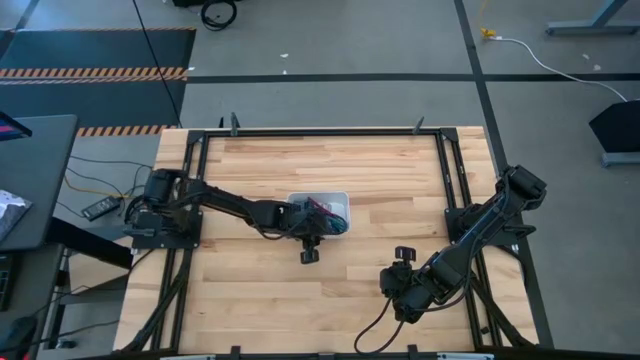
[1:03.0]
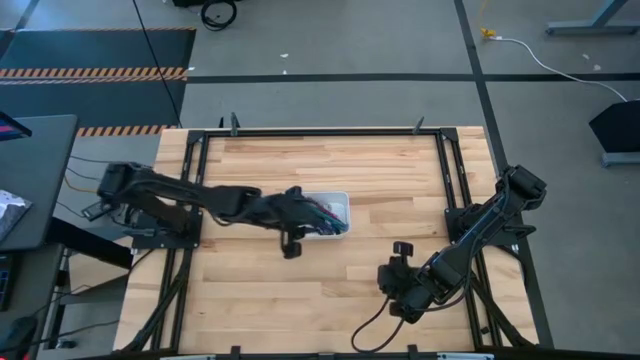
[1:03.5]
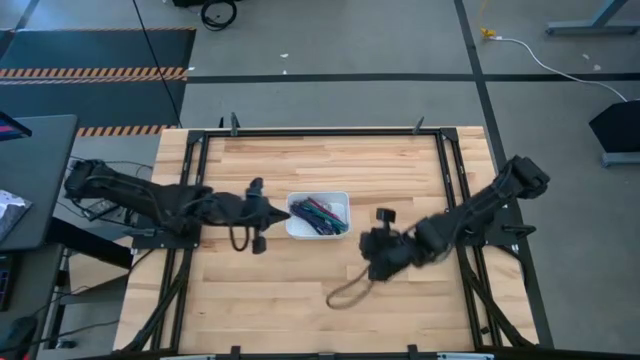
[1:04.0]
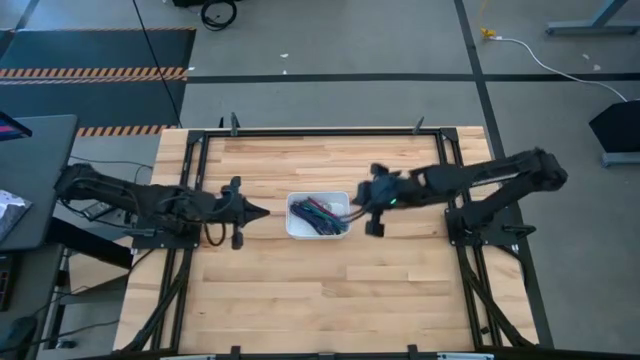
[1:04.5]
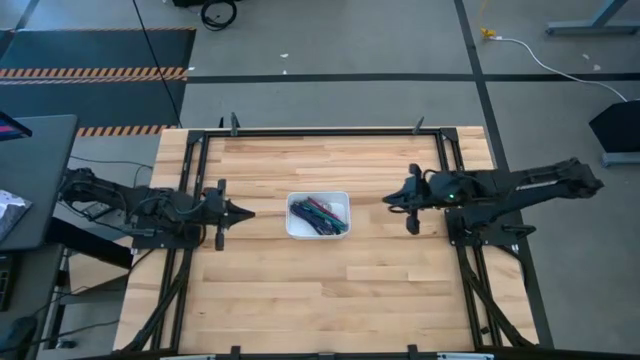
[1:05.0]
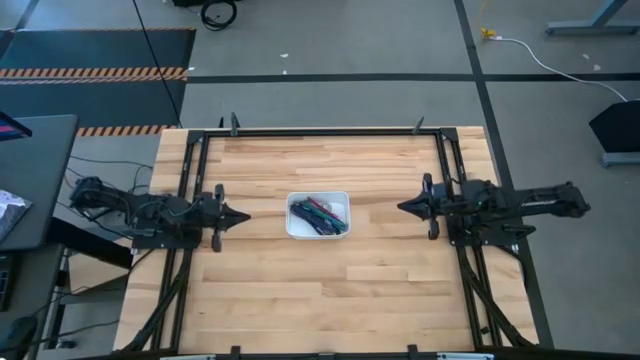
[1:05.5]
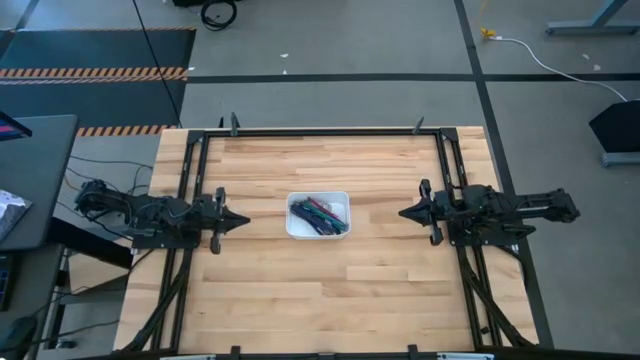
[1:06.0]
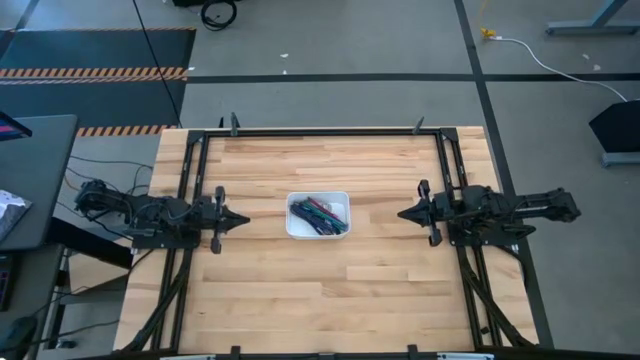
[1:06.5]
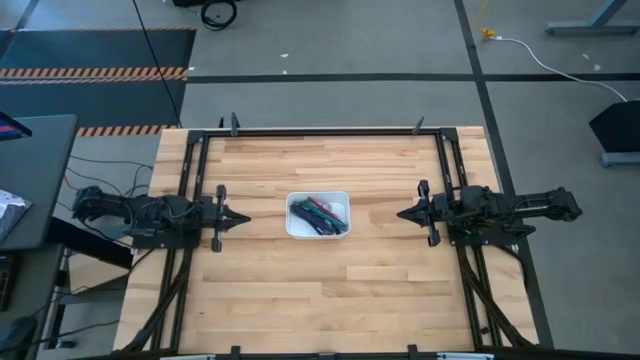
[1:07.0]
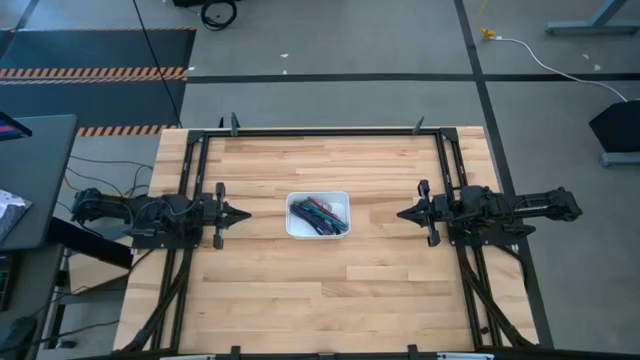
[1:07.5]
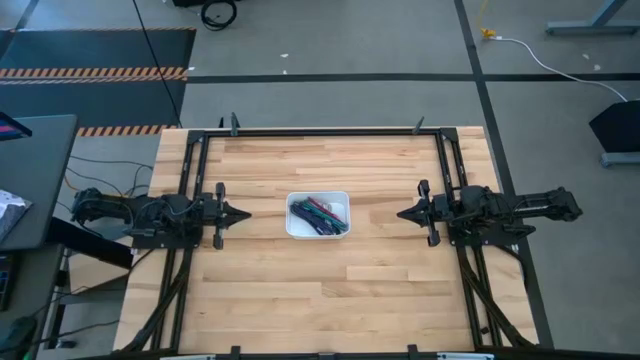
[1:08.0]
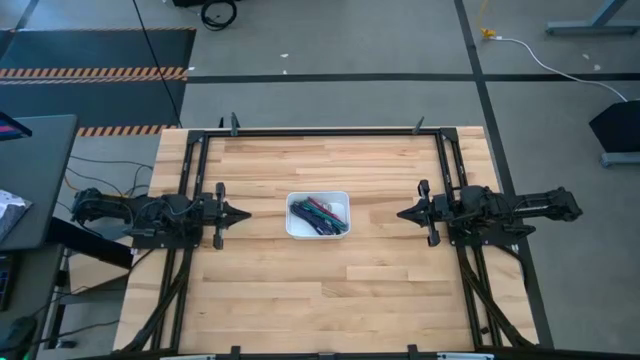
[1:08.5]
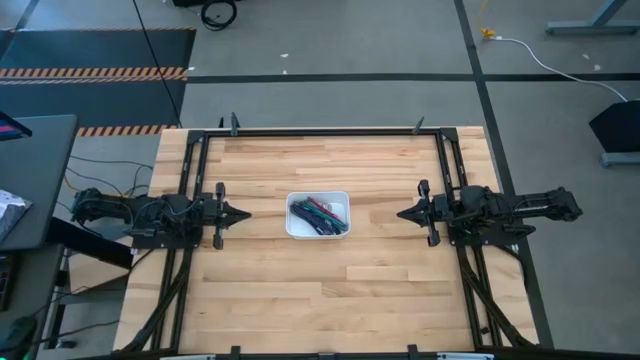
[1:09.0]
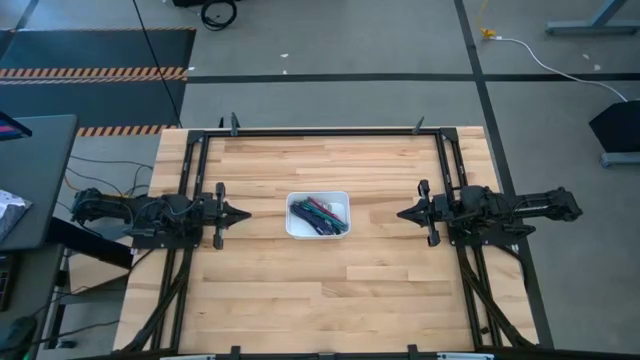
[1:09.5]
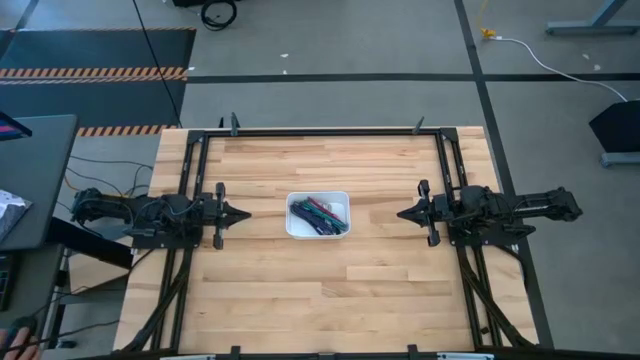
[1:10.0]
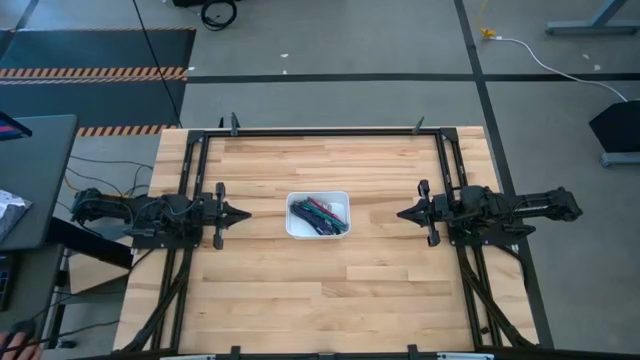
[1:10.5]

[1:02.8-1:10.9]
Task: Pick and place USB-C Cables
Return to Home Position

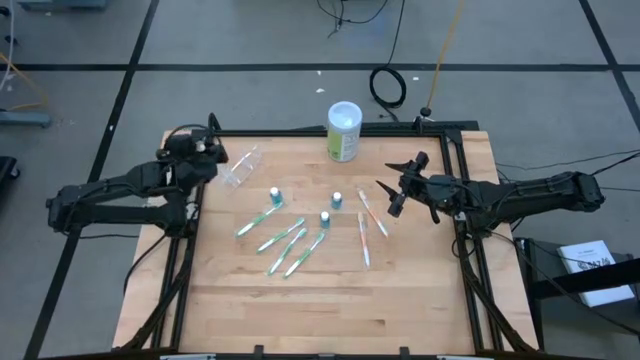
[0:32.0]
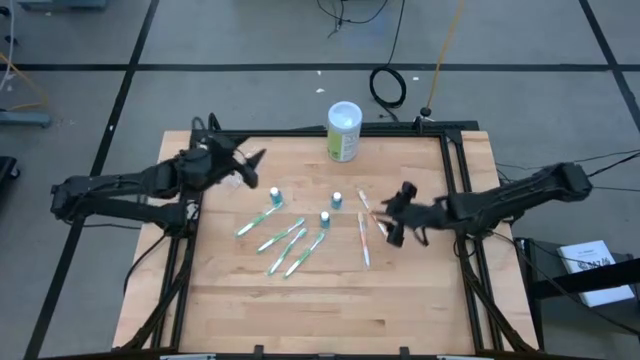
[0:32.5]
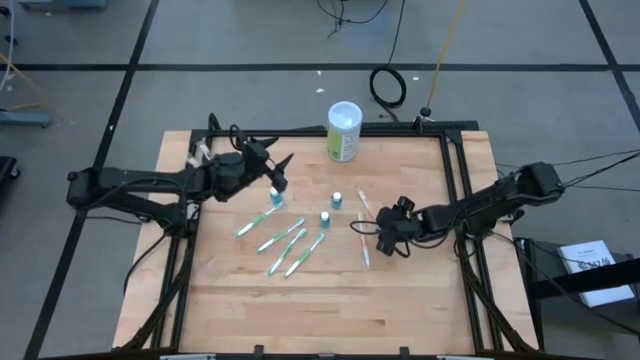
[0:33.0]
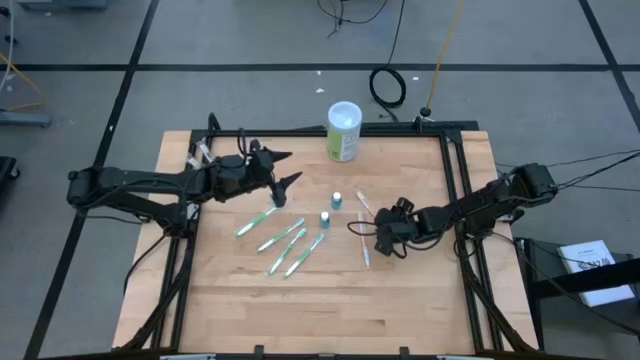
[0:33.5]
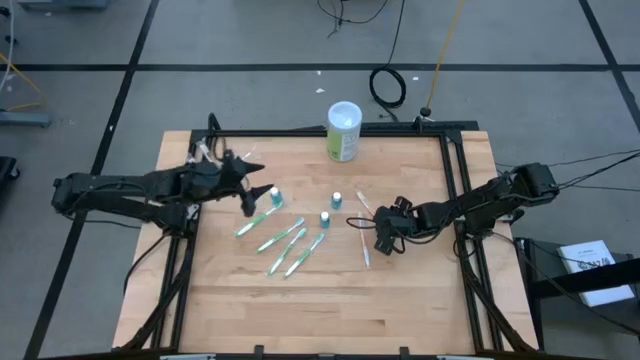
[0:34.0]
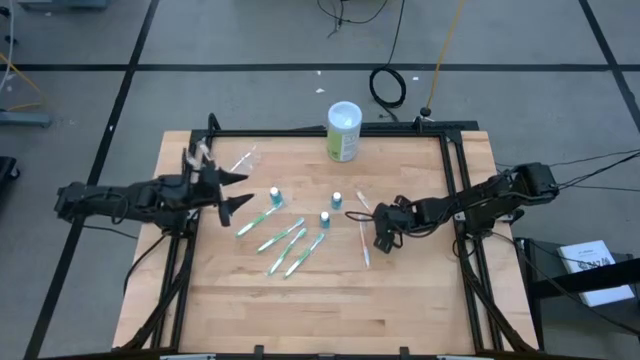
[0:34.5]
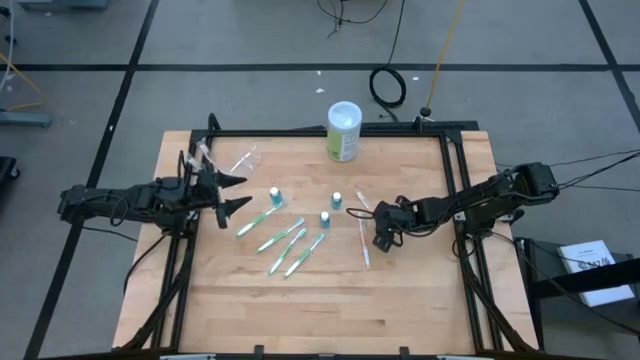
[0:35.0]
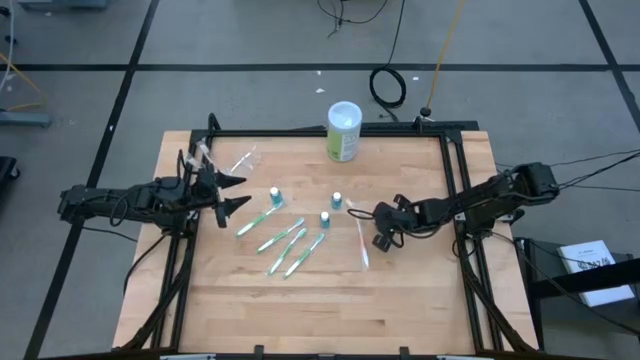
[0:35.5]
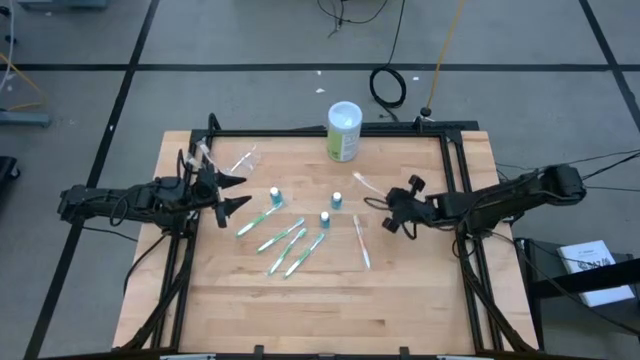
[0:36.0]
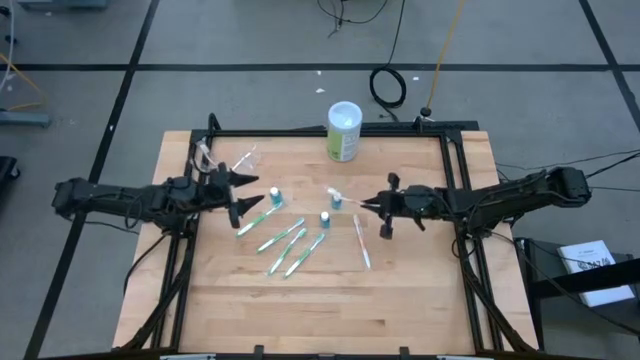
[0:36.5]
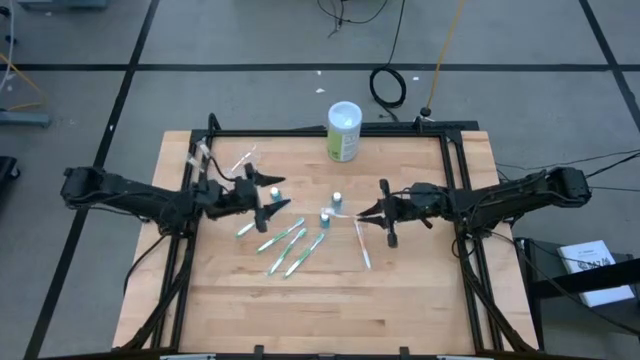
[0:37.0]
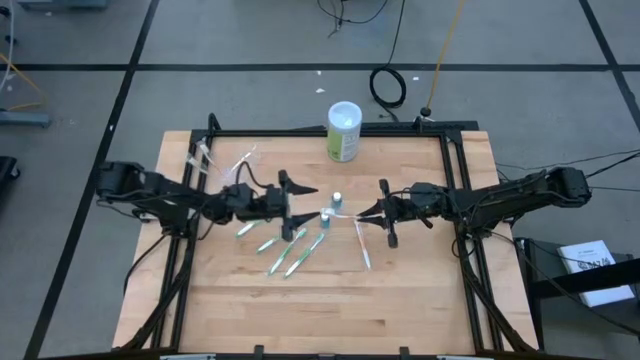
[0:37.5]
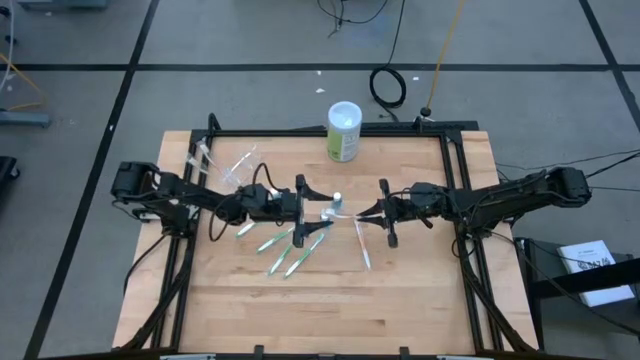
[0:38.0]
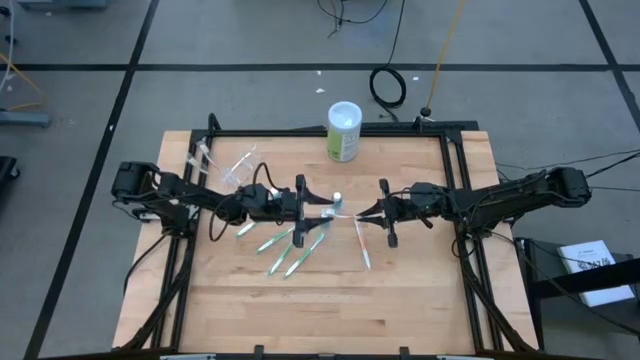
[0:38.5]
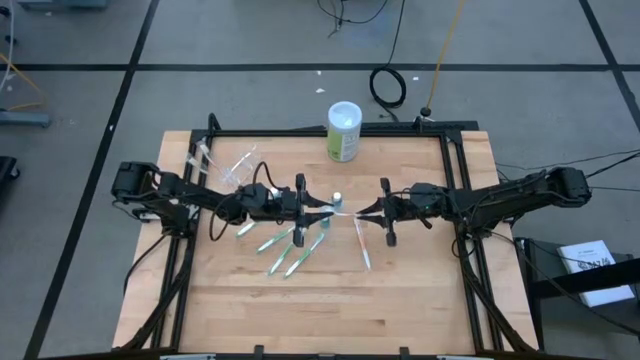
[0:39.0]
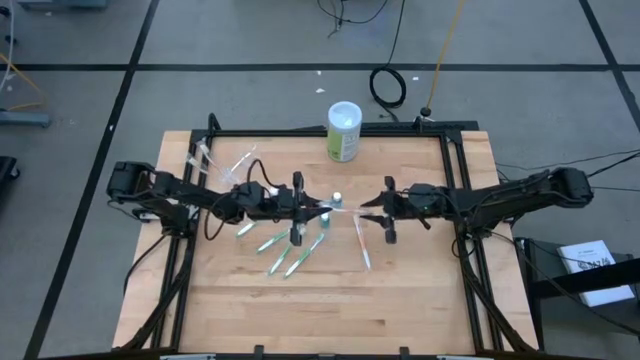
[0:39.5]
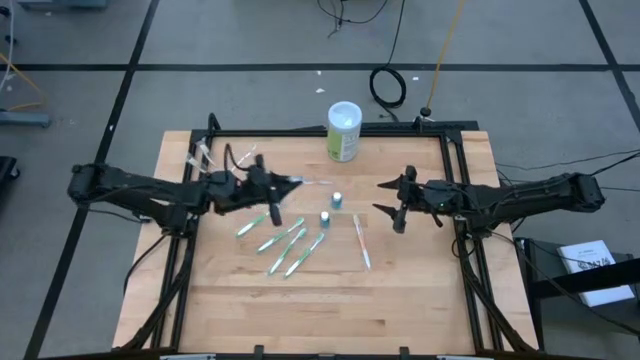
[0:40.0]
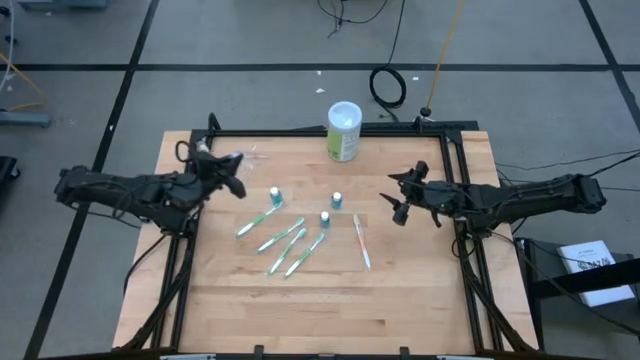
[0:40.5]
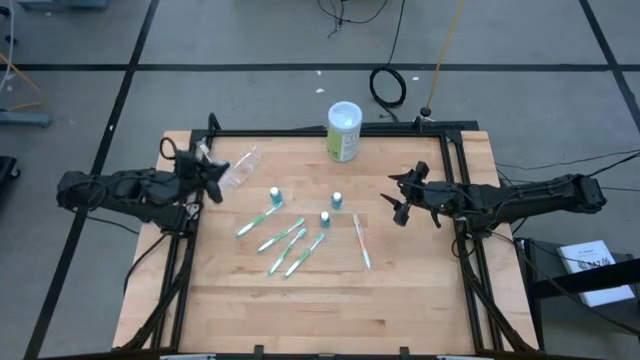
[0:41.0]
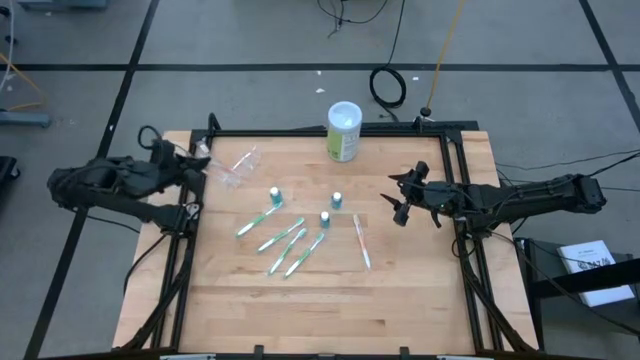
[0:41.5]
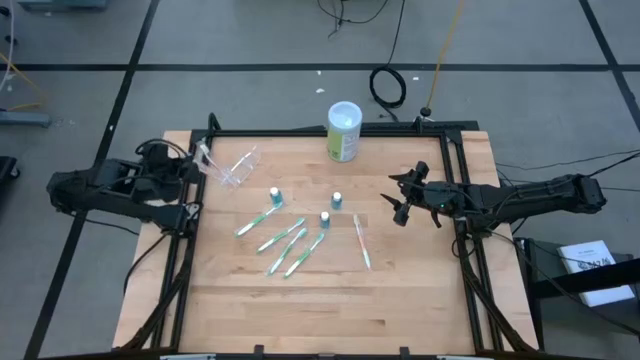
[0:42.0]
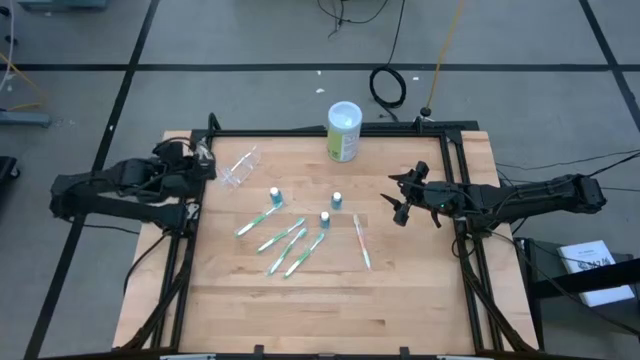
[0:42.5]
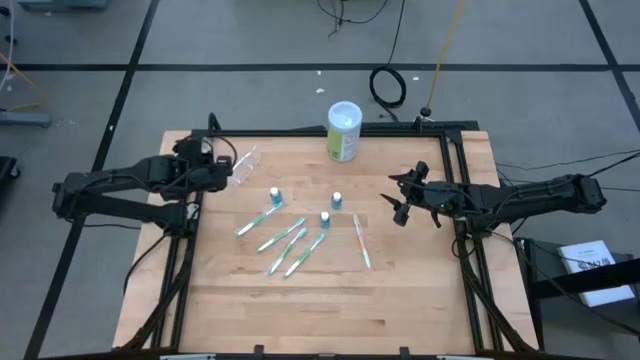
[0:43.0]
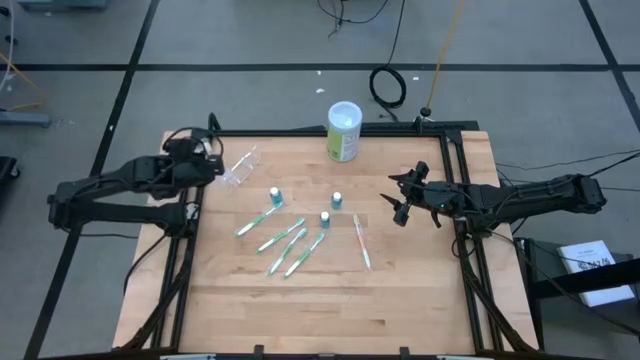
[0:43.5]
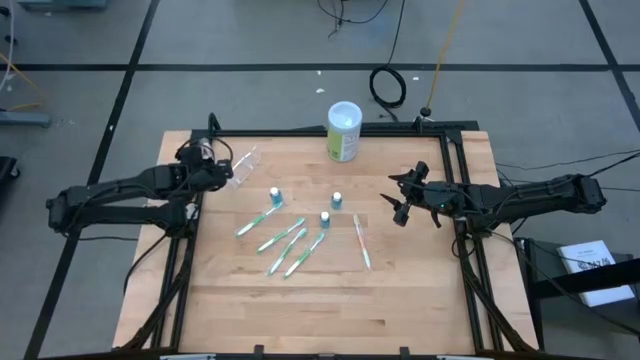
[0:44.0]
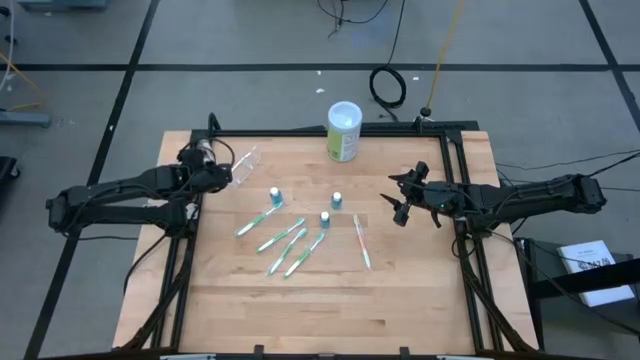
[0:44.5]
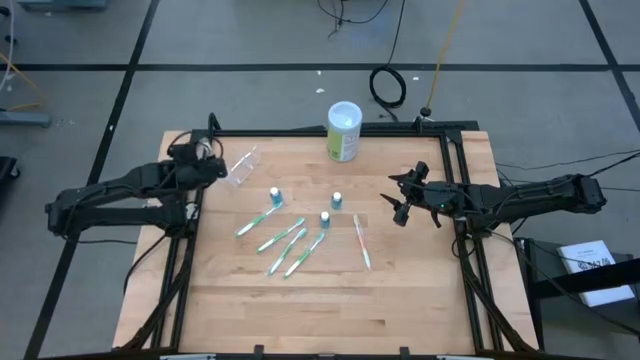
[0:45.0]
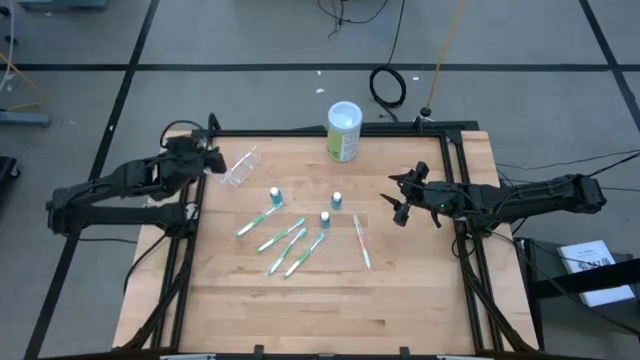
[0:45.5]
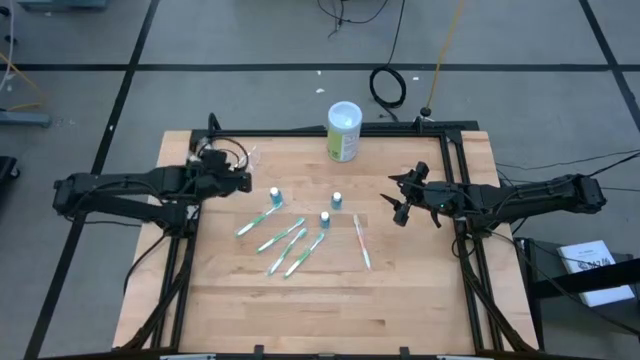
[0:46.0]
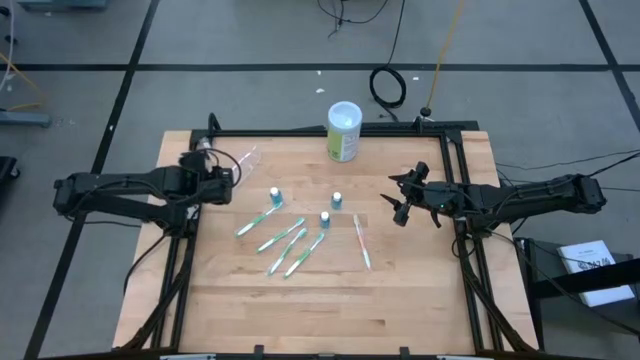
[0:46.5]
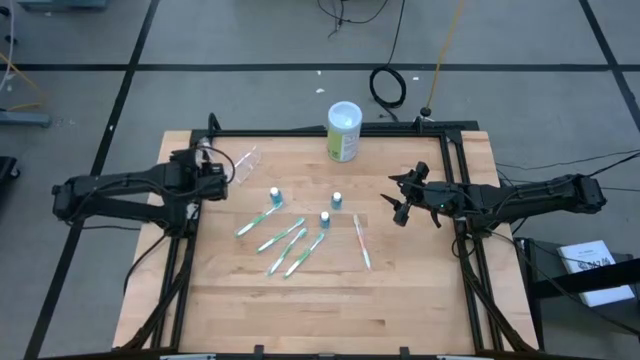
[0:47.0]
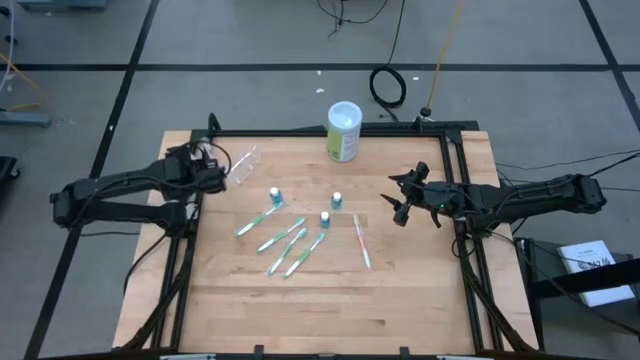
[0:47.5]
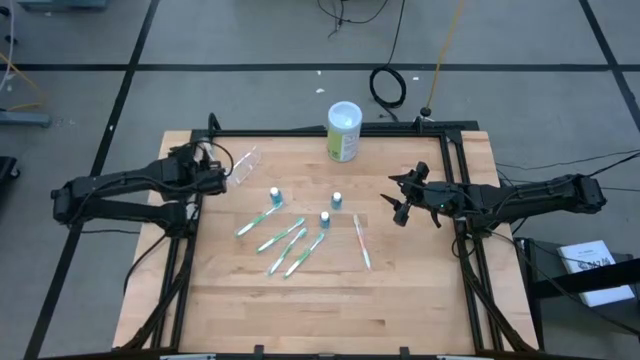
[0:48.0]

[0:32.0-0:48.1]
Task: Pick & Place toothbrushing station
Put the orange toothbrush into the left section of the transparent organizer
